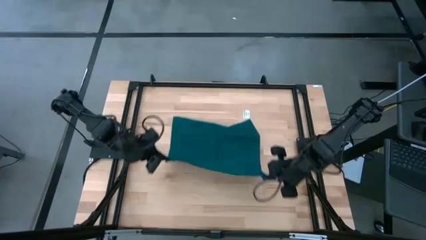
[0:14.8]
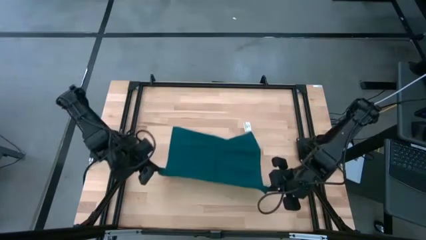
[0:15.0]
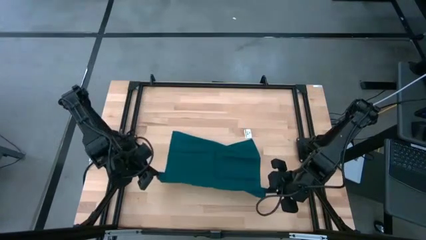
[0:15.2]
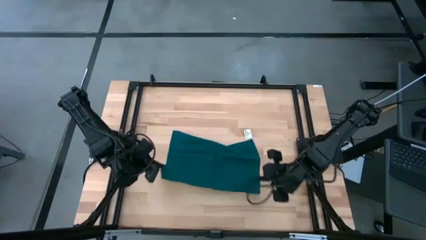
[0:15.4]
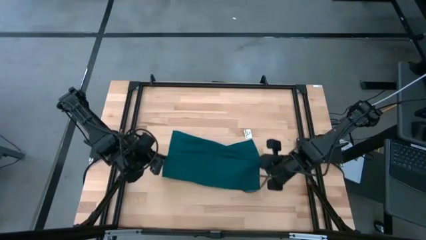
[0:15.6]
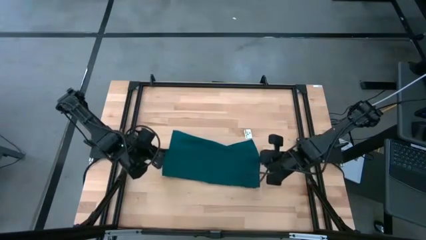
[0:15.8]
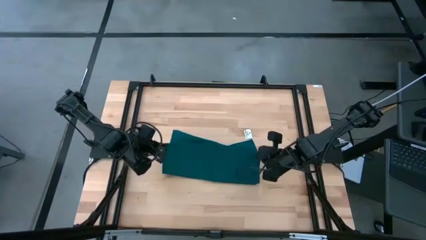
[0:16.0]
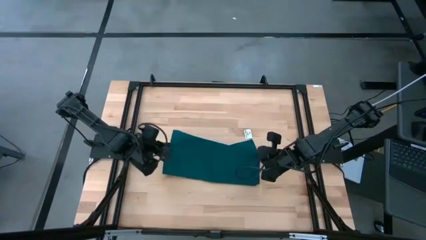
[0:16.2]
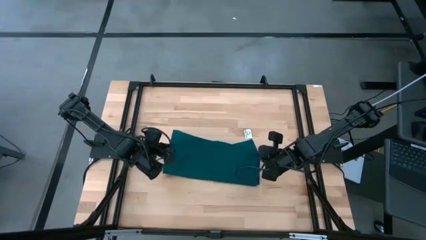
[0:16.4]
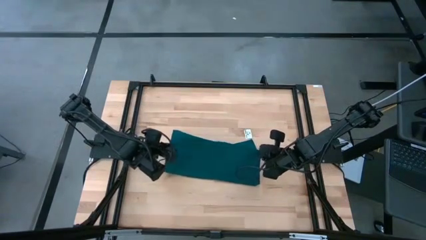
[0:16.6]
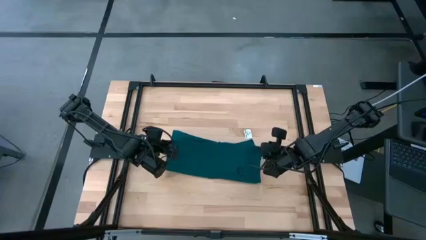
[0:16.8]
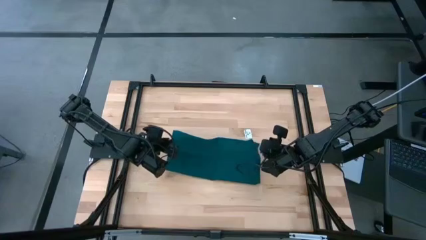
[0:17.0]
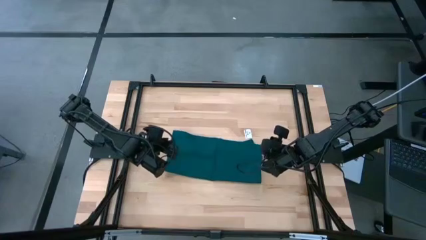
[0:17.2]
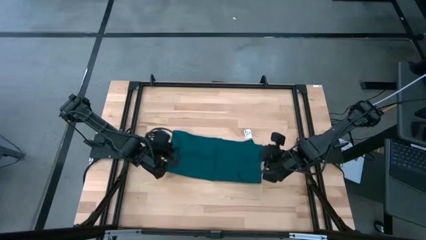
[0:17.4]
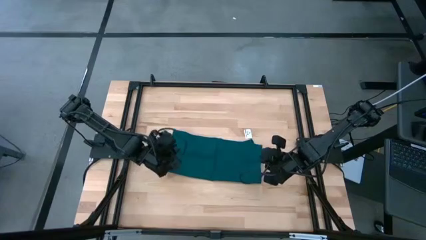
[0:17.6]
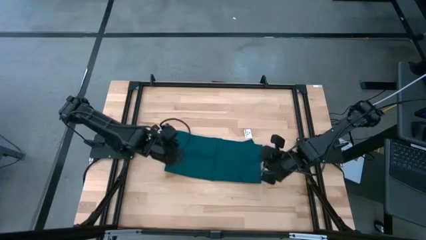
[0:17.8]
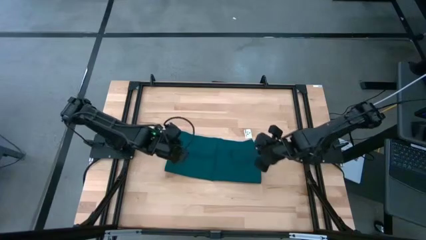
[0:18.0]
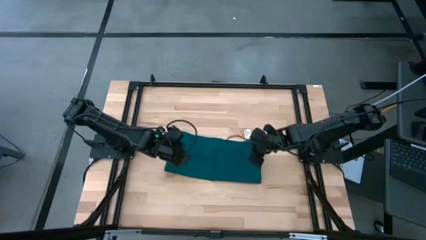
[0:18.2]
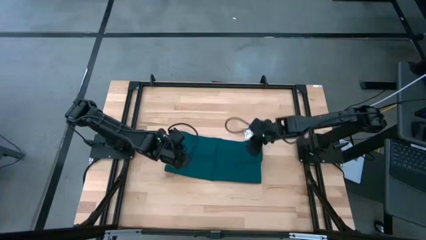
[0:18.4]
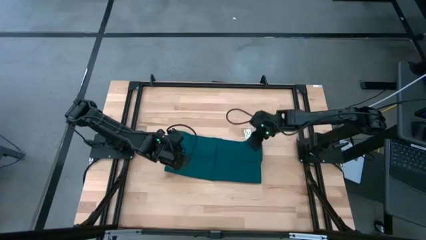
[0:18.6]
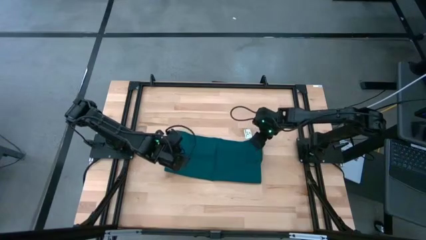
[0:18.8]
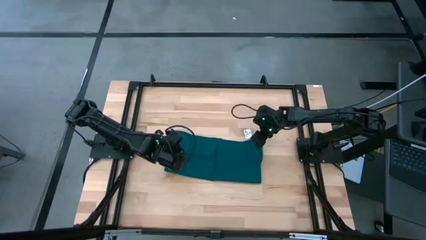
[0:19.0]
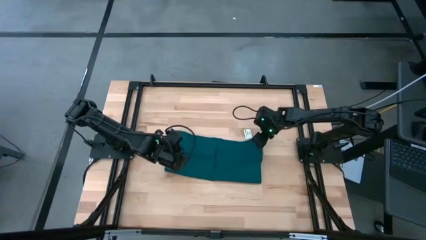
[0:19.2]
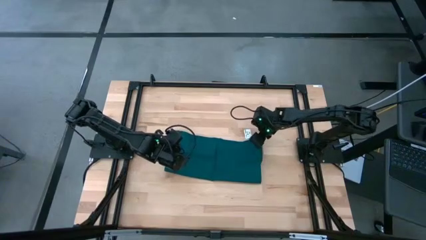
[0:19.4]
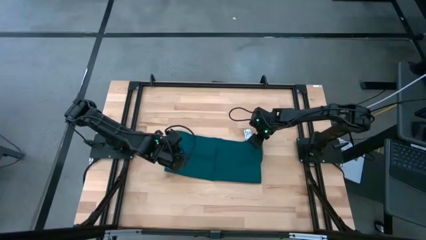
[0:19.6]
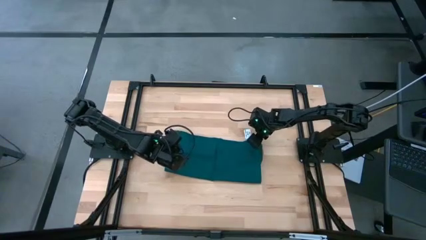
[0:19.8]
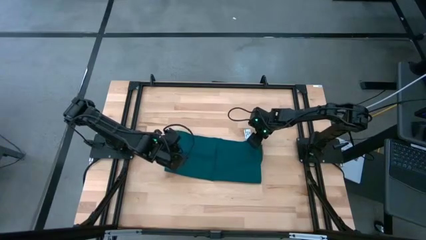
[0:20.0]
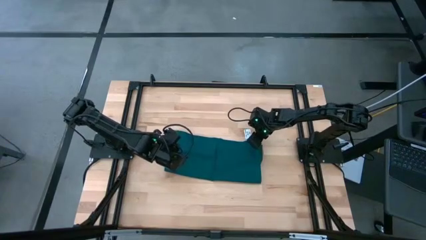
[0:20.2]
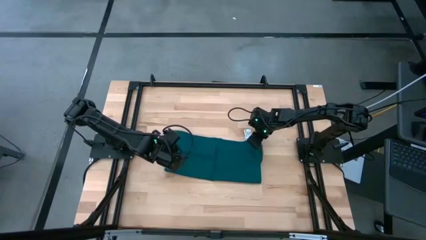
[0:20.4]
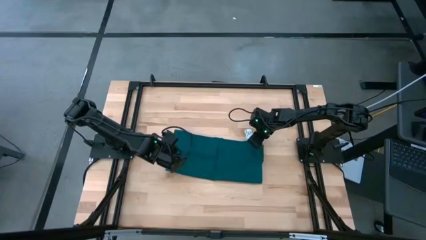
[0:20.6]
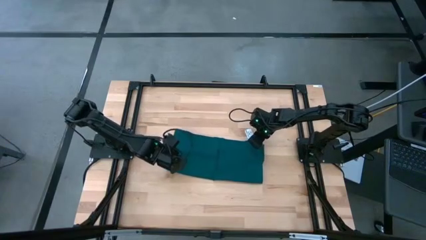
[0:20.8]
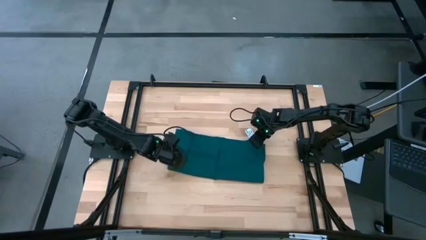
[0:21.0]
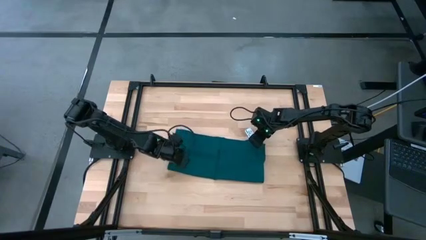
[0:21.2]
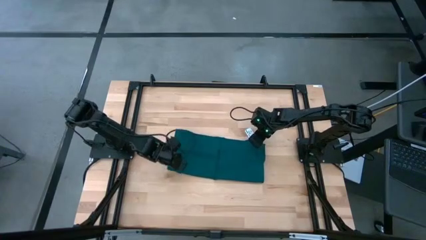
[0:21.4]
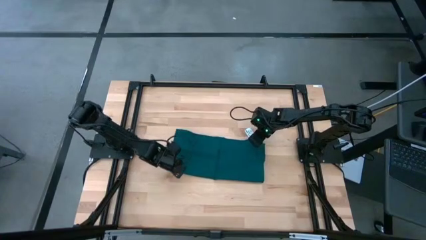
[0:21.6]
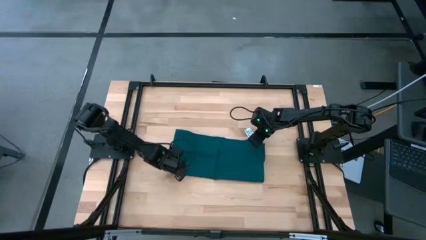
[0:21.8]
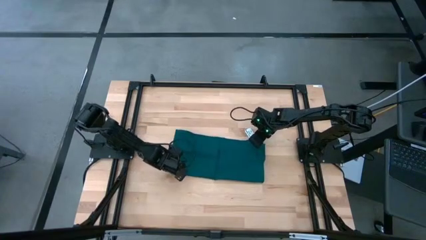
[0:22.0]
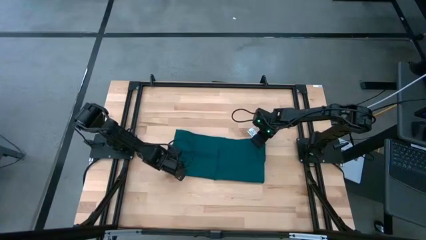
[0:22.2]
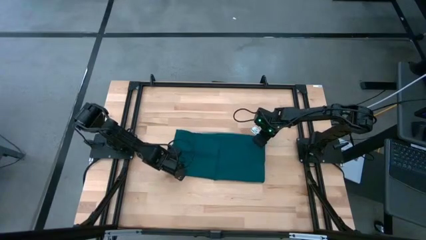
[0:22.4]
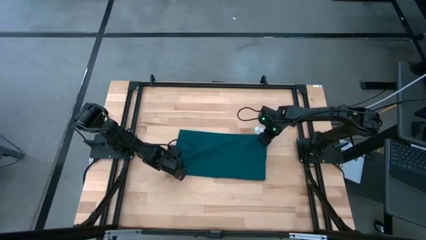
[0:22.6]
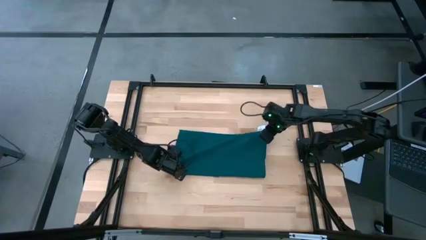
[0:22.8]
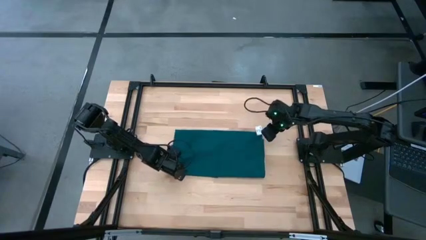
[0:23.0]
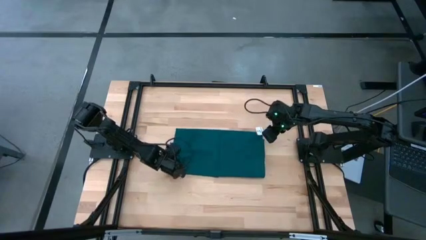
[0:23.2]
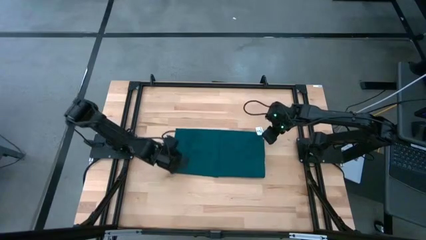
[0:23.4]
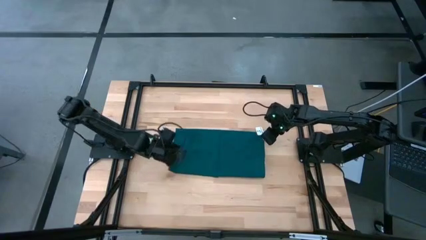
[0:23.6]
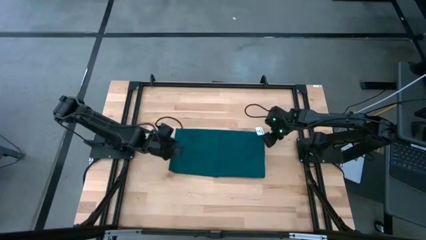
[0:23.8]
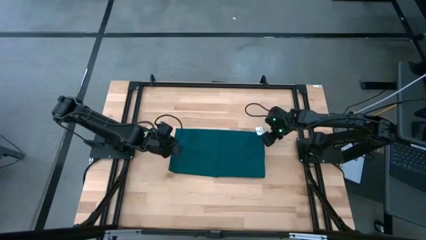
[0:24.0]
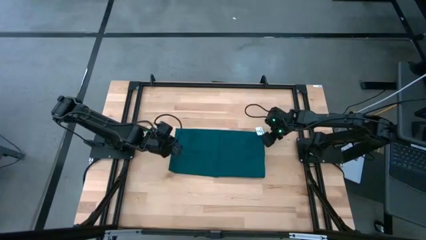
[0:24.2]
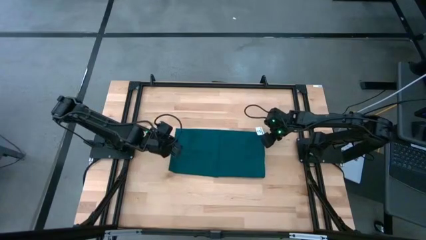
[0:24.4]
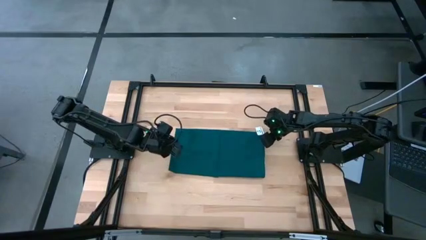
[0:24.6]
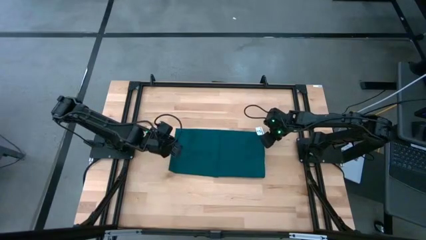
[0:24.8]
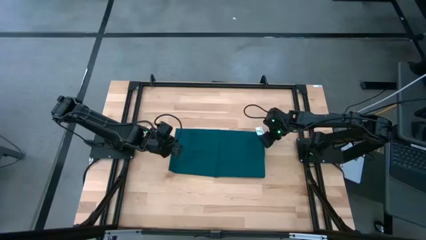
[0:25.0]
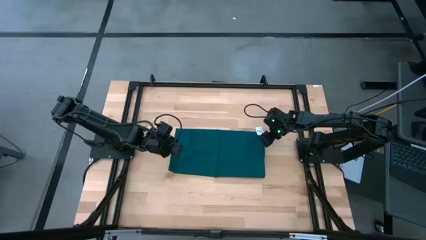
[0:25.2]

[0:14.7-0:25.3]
Task: Fold microfiber towels
Fold the green napkin

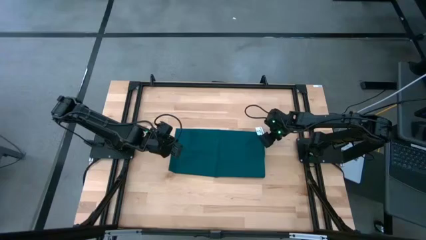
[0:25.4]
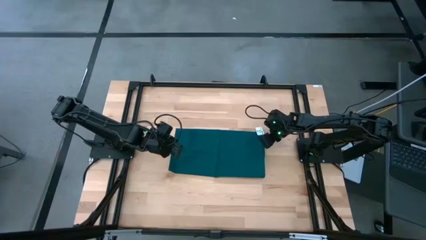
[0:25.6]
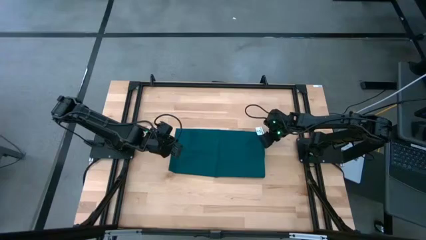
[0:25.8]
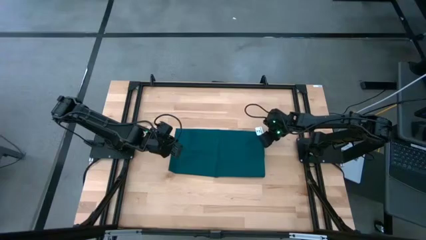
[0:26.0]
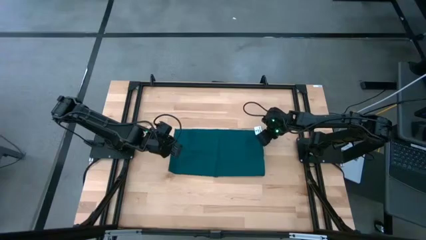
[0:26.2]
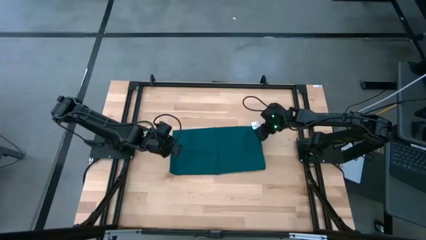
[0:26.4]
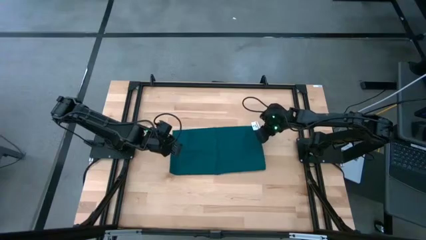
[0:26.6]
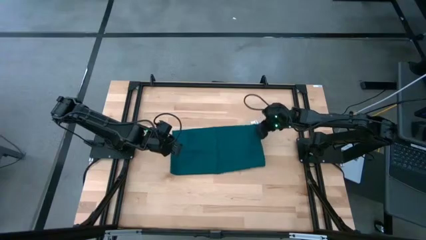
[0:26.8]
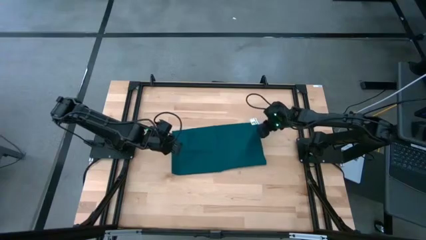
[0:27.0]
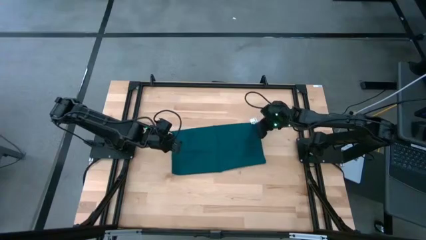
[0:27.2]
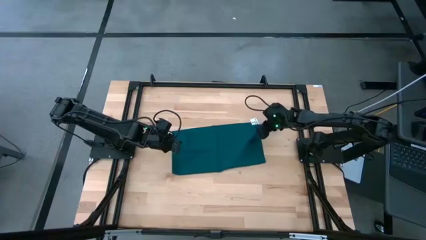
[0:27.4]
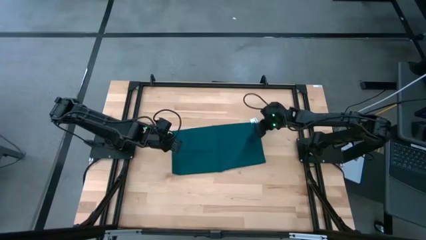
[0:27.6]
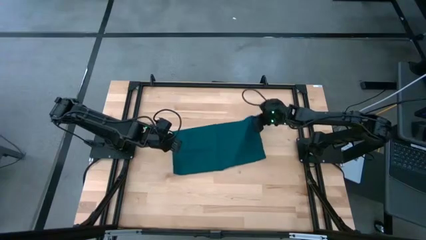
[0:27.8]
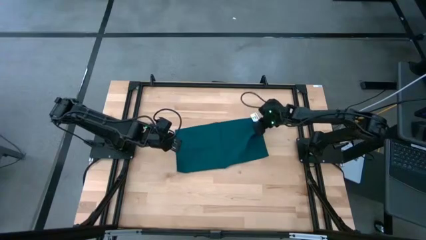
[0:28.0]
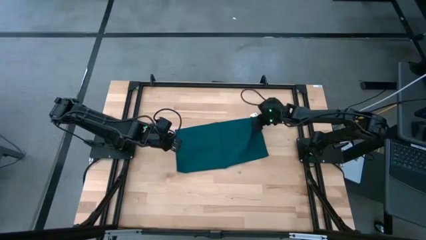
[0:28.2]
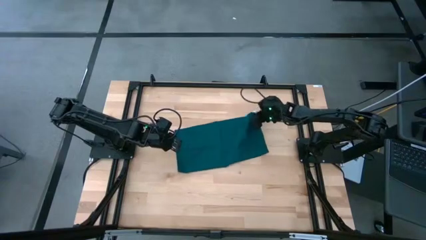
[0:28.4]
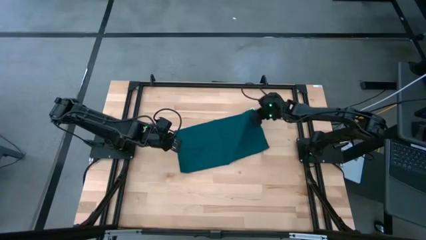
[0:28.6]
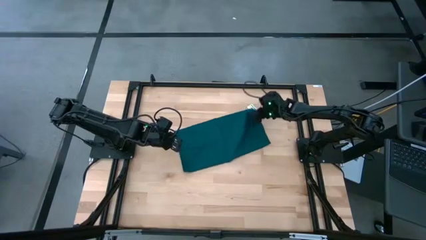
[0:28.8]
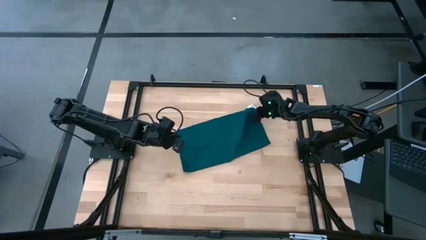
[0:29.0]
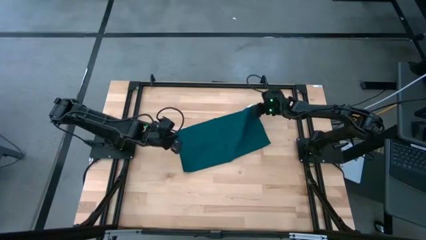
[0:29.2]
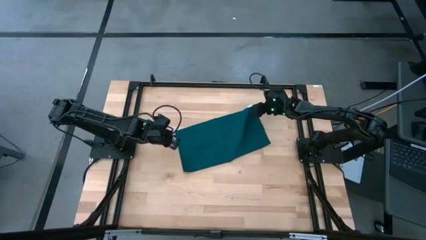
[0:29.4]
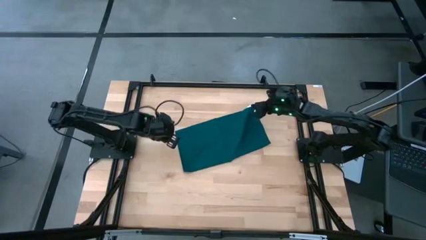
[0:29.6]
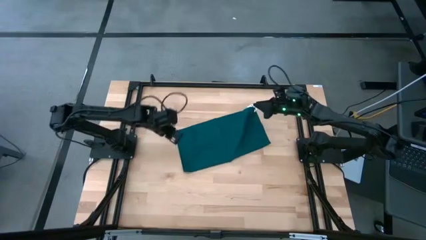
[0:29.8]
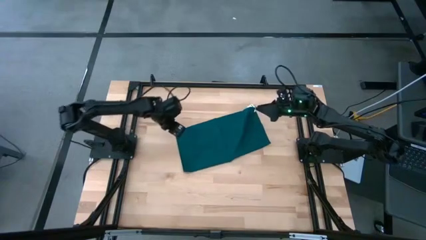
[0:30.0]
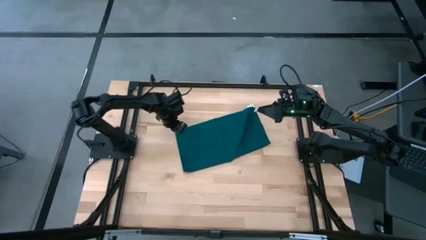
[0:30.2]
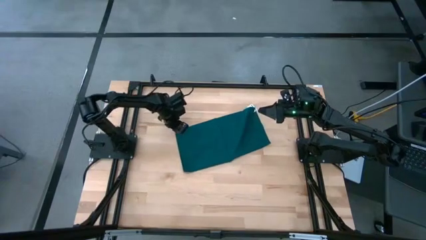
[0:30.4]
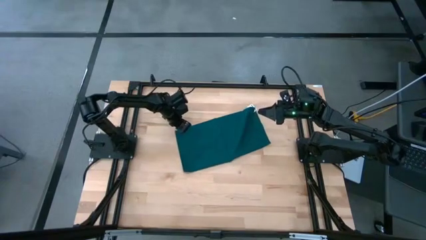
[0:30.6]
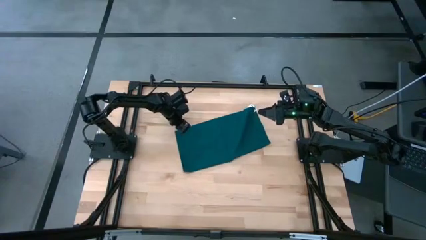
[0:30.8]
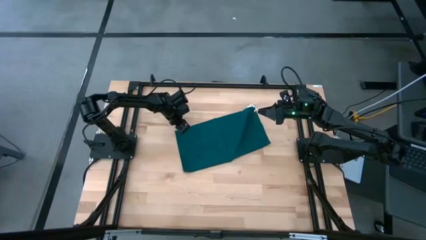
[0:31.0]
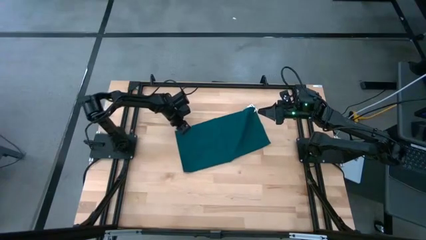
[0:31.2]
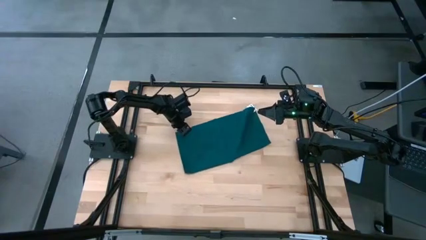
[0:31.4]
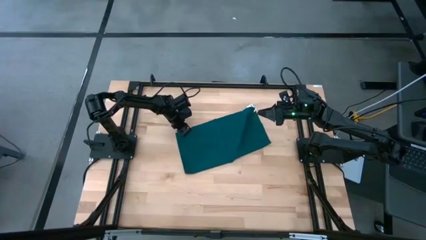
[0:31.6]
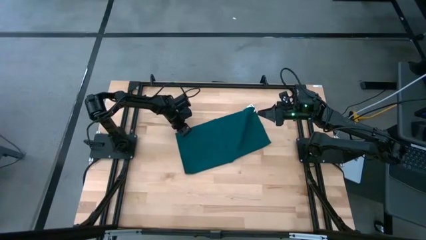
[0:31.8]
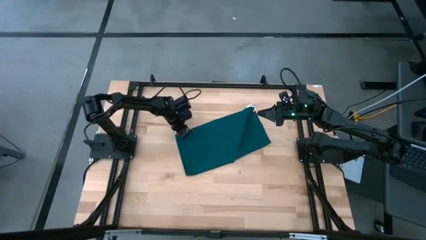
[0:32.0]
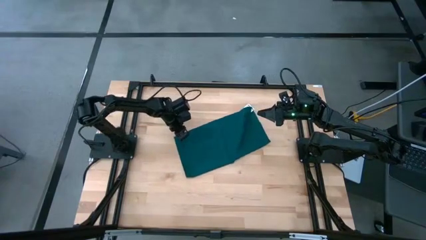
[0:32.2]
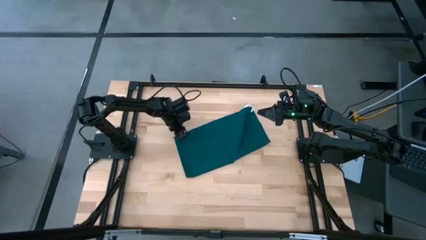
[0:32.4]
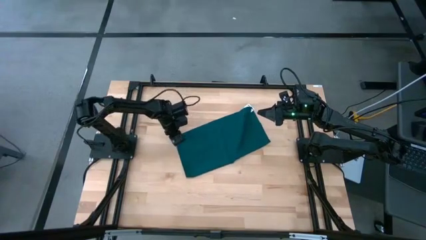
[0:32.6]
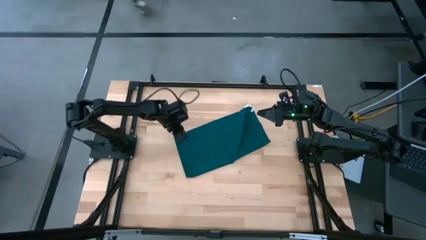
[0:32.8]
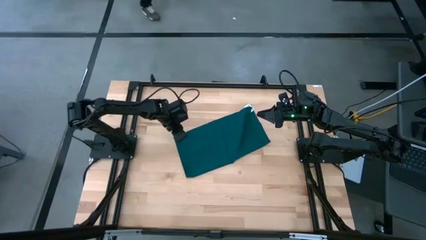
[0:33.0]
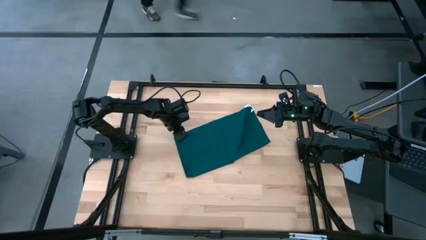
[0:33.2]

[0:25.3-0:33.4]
Fold the green napkin
